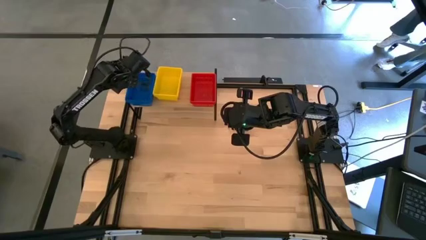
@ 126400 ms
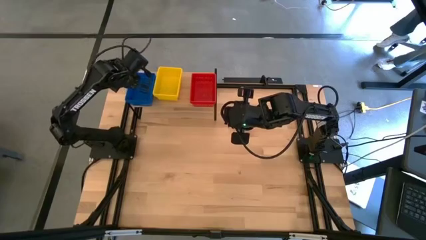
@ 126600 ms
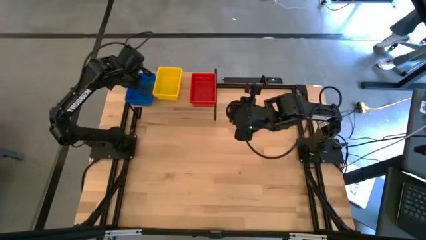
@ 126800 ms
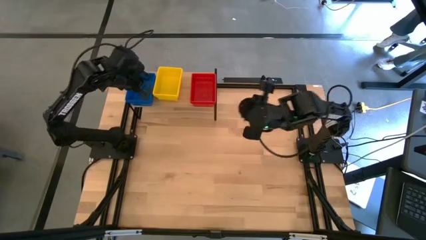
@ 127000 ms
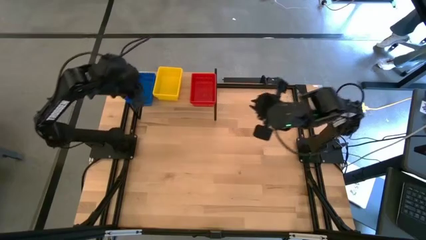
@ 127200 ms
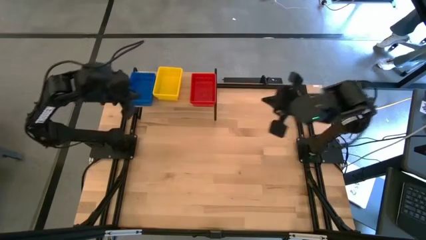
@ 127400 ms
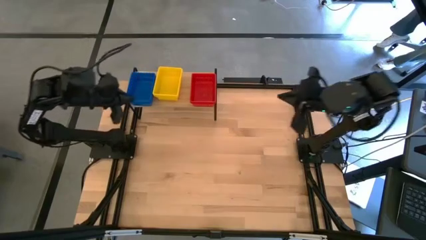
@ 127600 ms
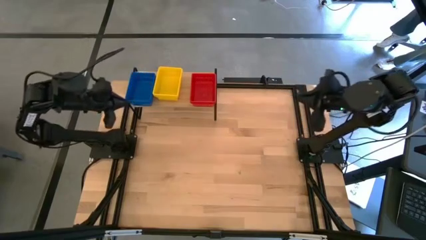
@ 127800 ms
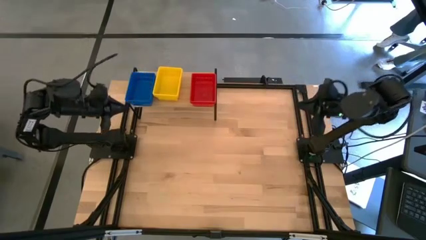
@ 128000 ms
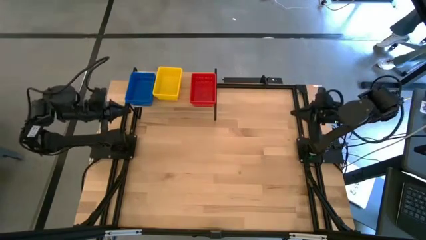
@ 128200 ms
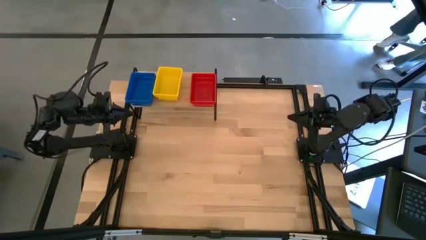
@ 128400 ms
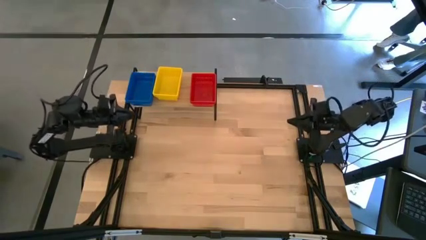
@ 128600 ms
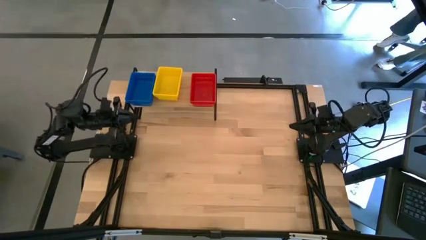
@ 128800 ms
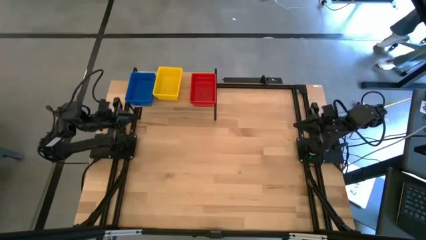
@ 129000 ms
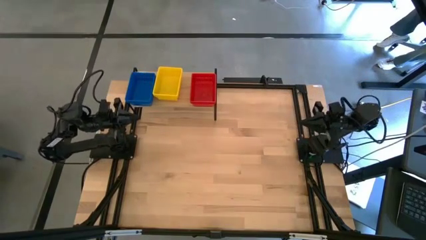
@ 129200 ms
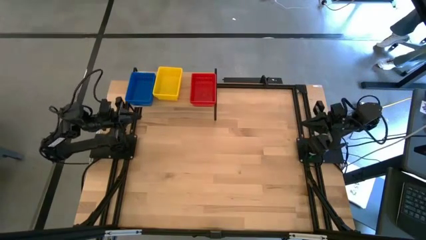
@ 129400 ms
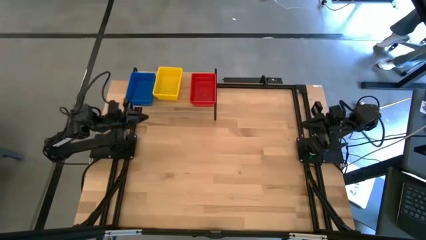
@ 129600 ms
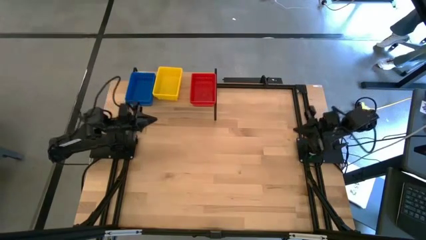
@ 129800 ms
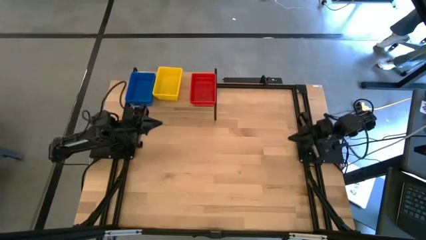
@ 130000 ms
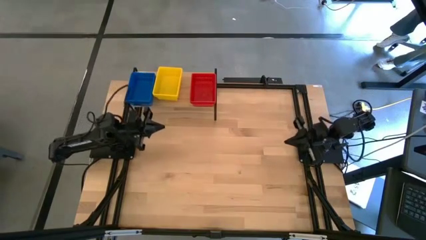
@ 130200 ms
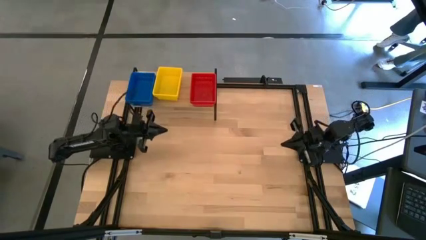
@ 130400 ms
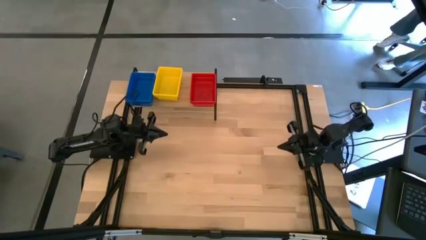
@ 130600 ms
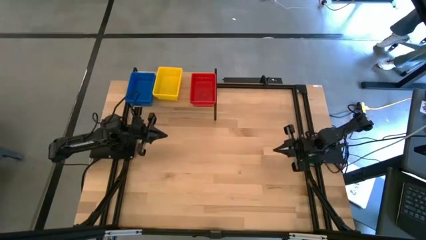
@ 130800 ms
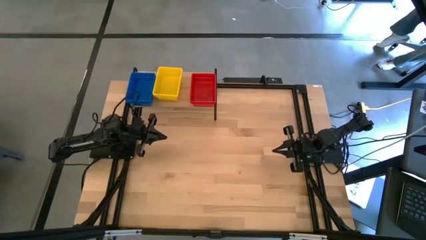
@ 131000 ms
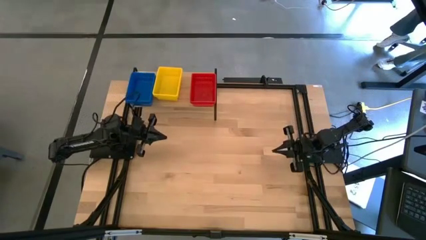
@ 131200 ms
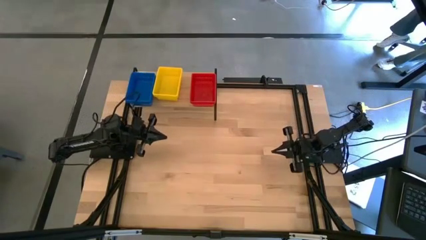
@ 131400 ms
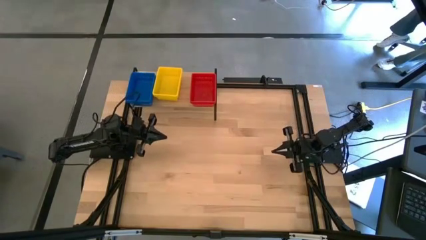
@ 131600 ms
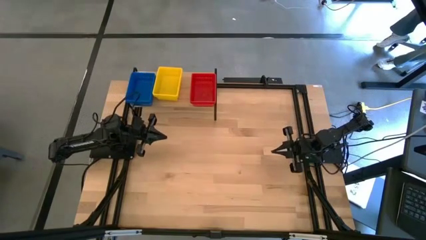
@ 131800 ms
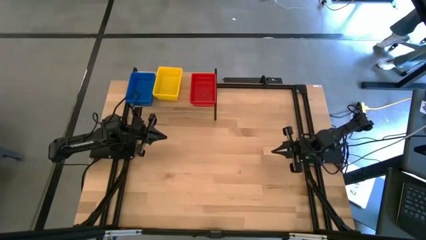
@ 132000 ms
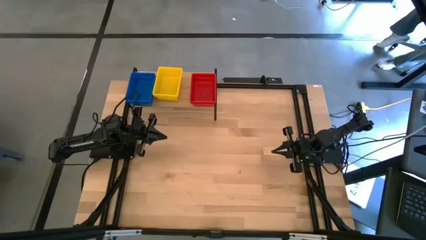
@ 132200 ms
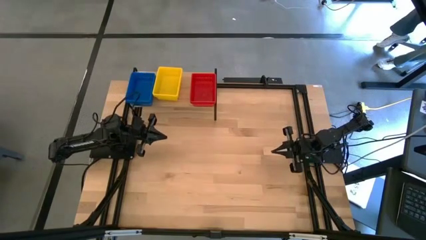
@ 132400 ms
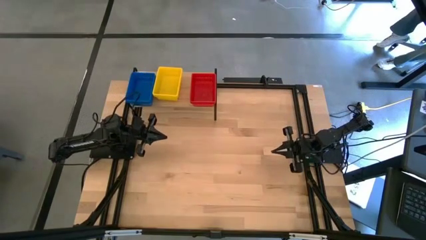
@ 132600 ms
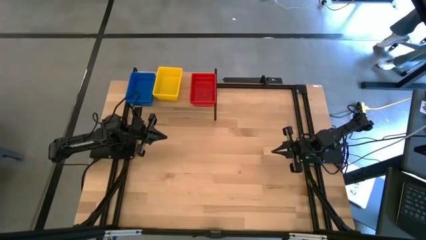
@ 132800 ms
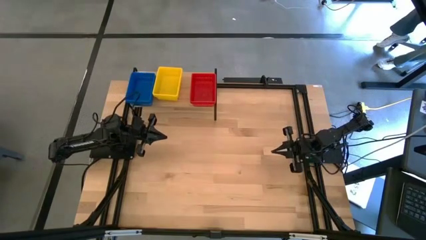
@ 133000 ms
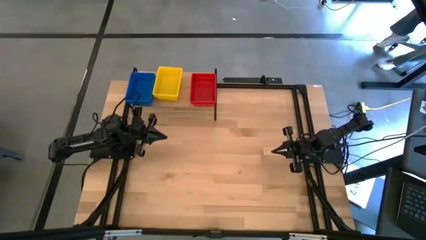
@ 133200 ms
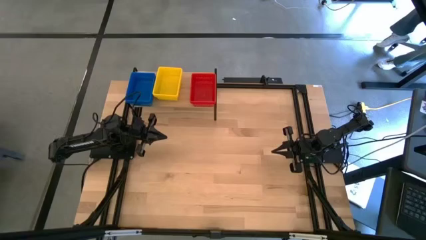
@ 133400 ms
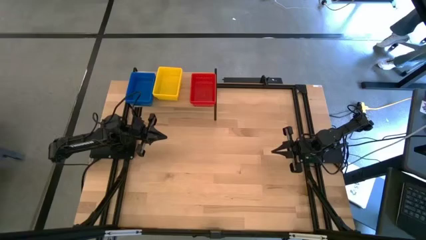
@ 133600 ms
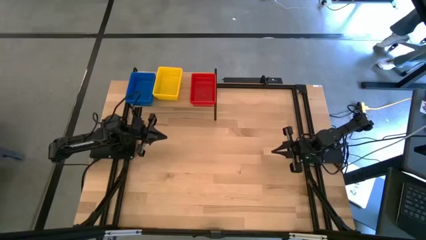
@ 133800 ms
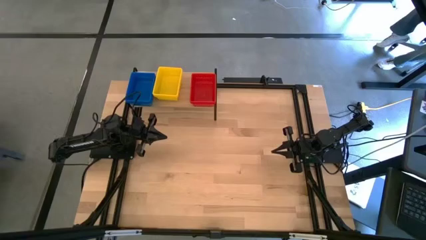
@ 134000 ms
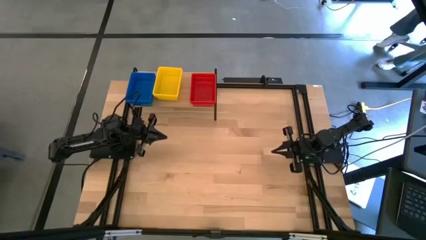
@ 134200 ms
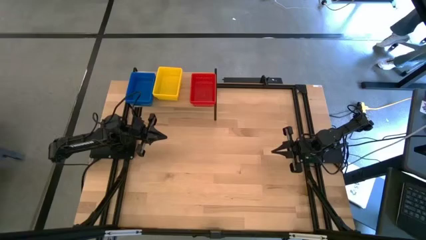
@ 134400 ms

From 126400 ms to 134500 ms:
Task: Stack baskets on shelf by color
Return to Home Position

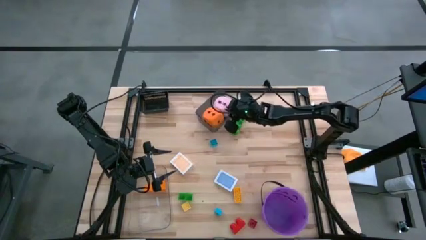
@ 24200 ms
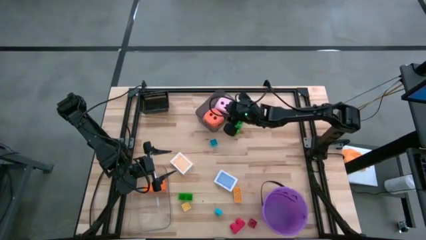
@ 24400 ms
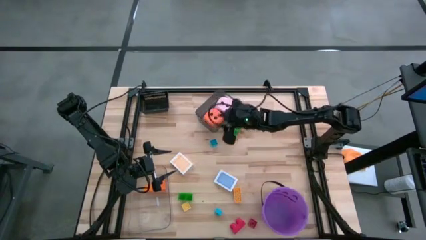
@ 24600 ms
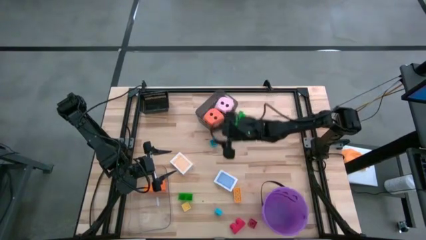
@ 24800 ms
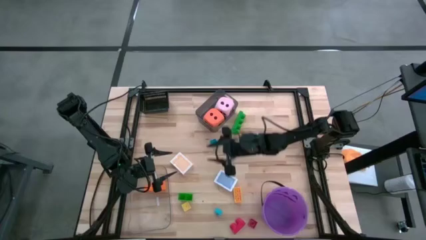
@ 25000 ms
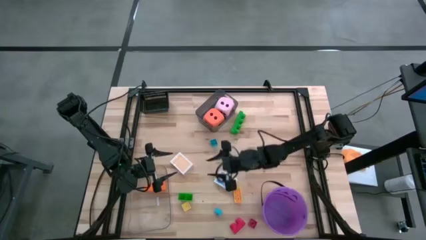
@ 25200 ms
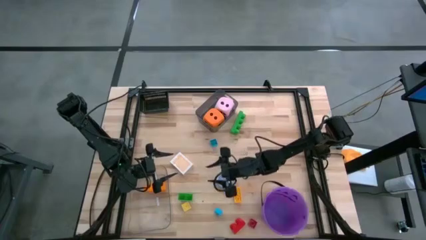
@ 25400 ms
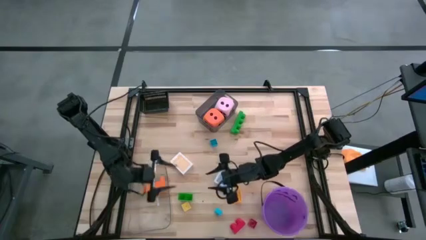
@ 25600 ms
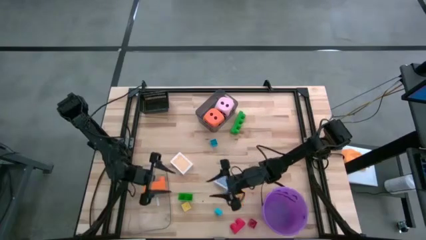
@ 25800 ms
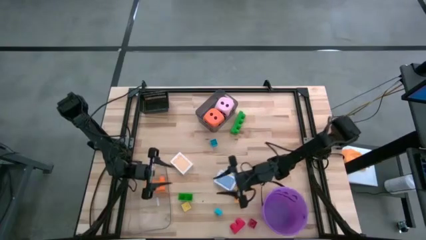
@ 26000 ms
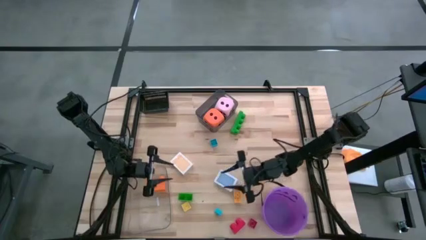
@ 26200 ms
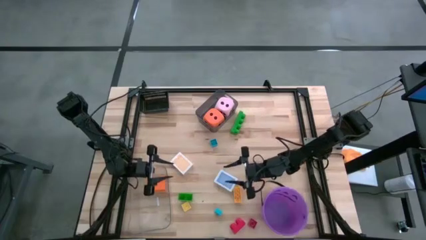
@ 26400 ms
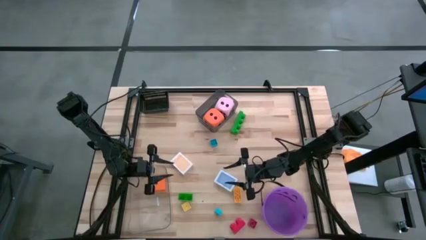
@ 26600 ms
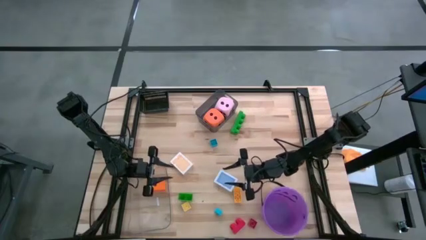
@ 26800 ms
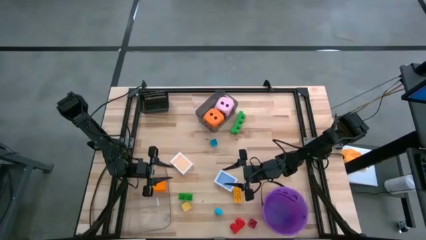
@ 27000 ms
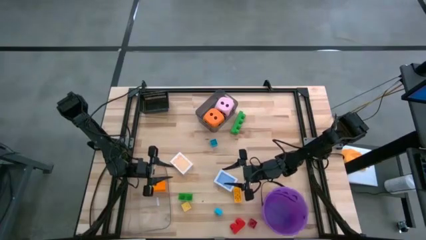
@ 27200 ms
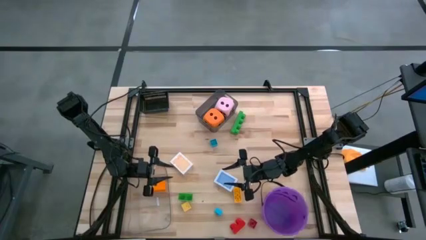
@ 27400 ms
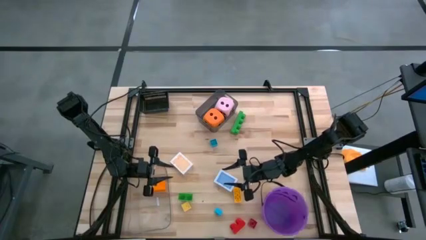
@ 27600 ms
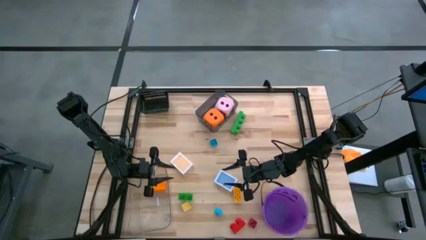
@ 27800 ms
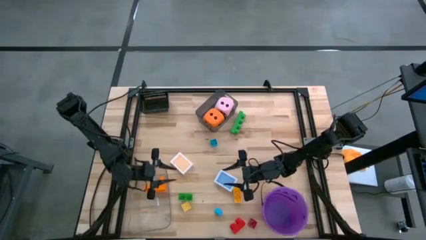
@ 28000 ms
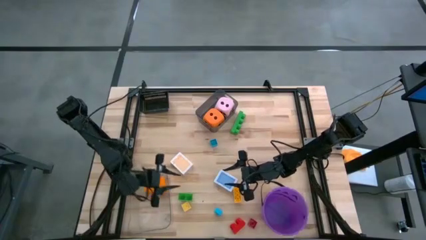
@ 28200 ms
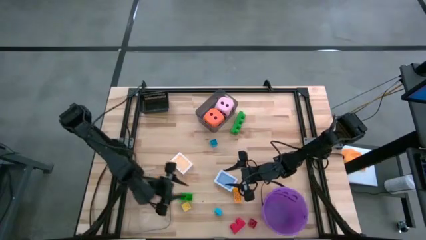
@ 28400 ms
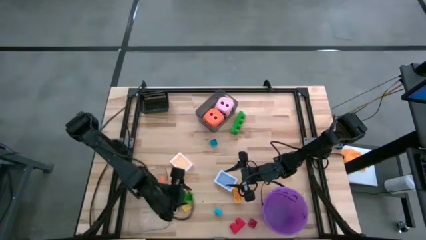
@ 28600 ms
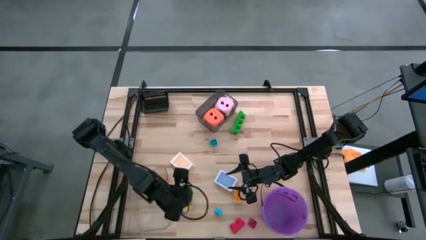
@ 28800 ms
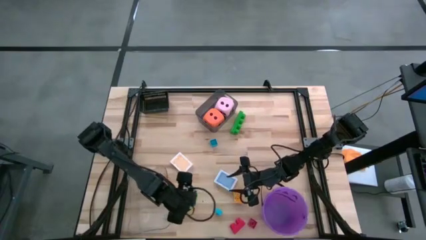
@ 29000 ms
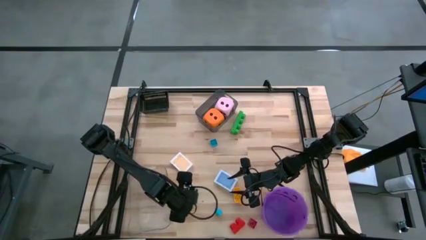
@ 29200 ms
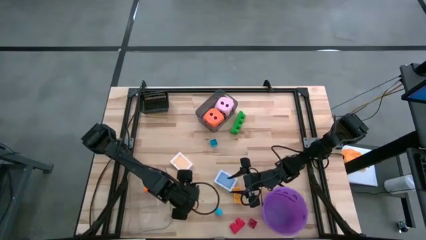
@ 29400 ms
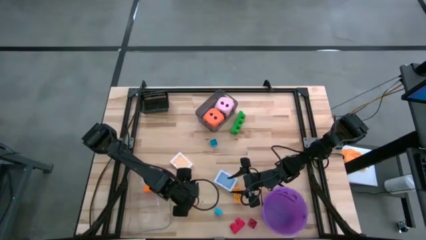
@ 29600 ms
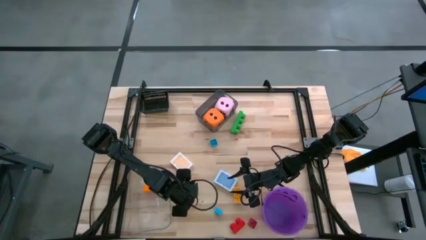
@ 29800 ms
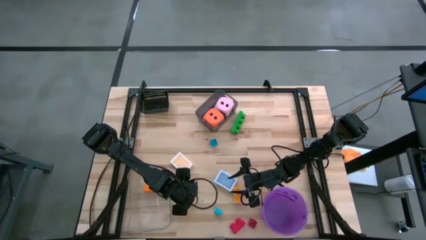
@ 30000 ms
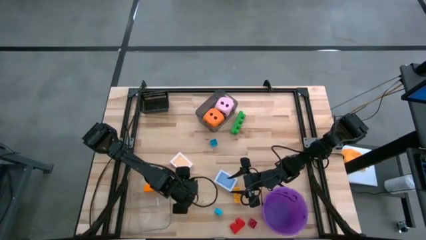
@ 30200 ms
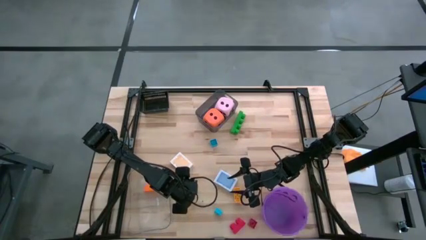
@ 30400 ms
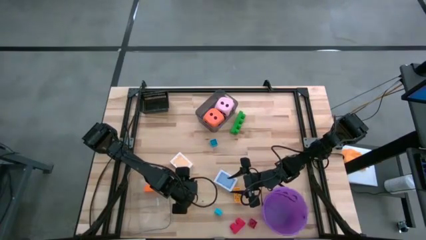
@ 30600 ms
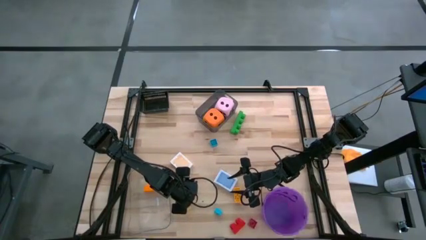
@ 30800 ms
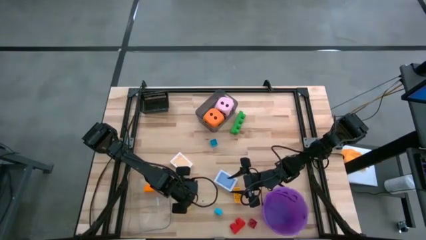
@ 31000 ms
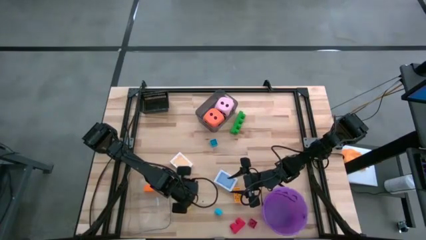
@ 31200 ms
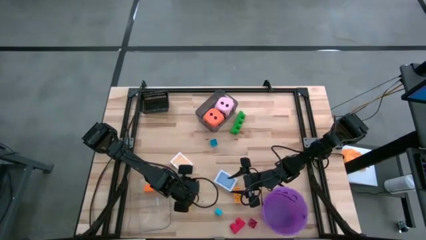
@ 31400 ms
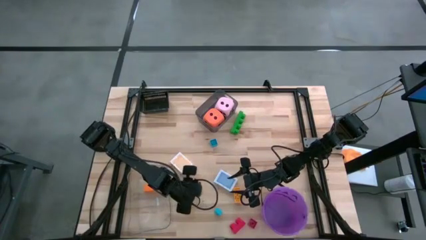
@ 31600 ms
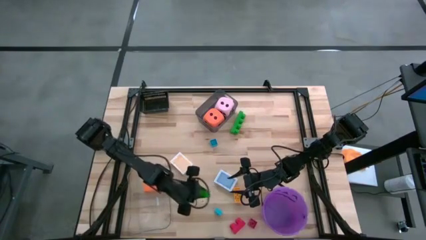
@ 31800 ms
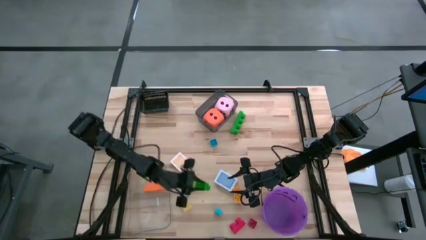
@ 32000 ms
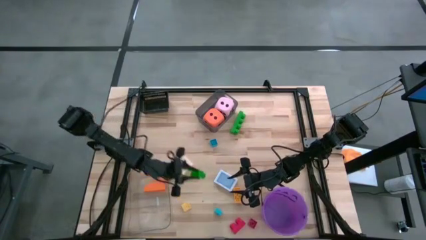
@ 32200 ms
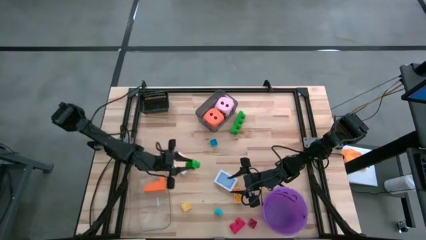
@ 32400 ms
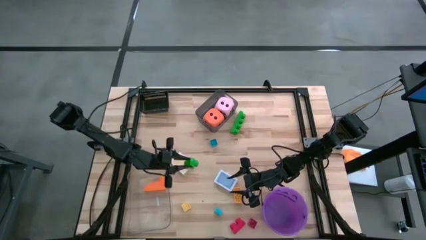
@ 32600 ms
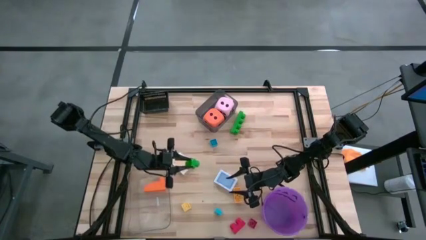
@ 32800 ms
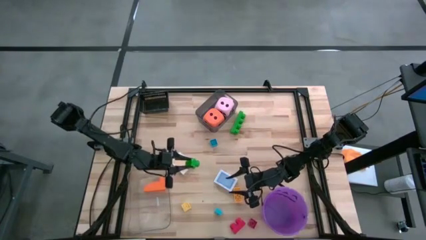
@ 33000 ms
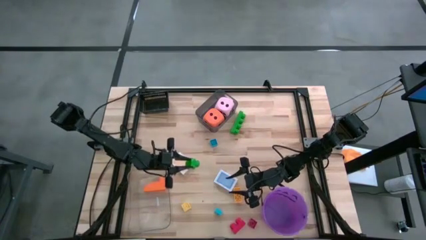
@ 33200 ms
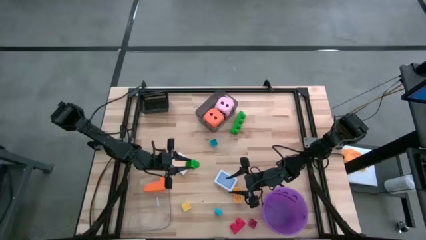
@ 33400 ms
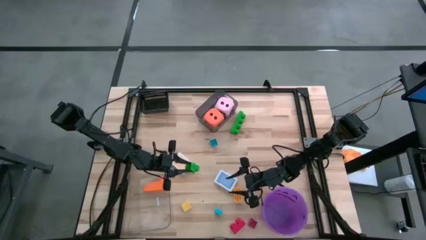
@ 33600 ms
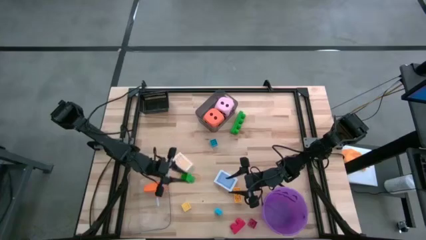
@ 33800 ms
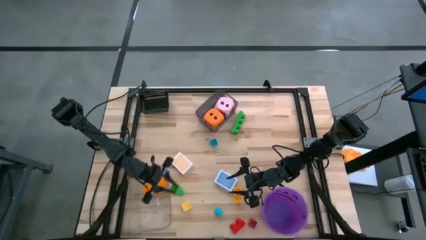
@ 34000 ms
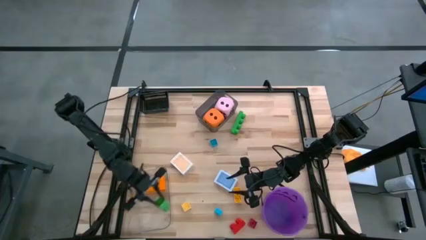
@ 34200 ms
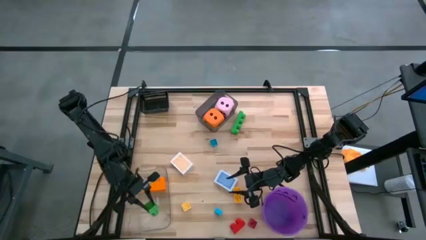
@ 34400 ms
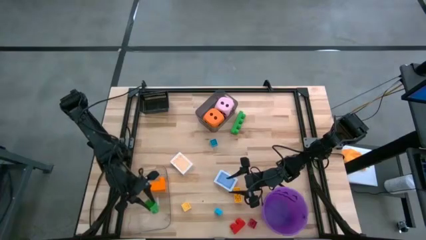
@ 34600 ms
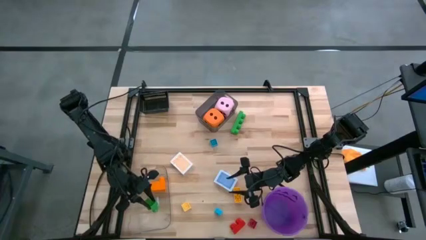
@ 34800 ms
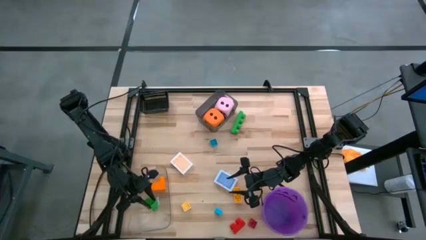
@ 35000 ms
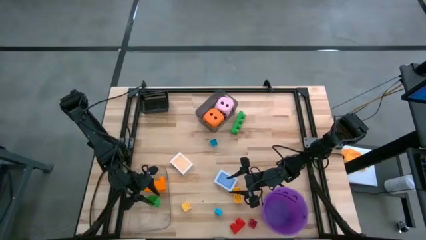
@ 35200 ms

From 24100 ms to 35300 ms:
Task: Pick & Place Toys
Put the green game piece into the transparent bin
